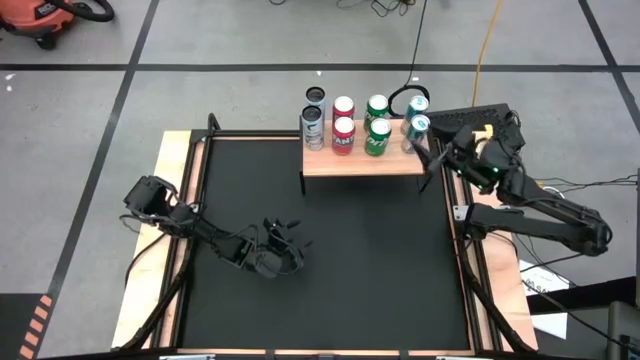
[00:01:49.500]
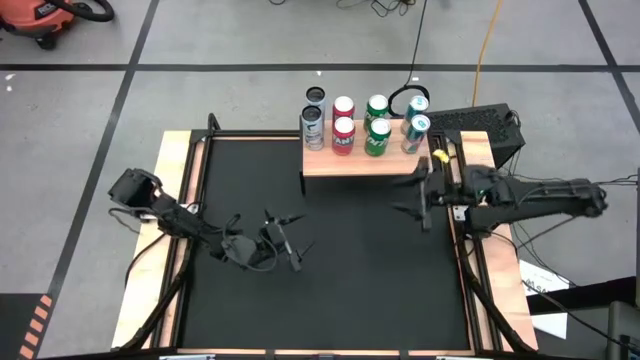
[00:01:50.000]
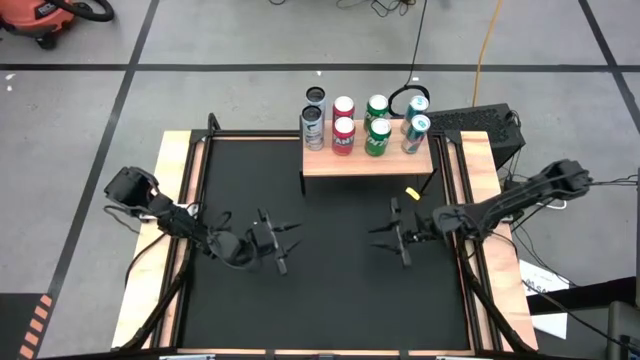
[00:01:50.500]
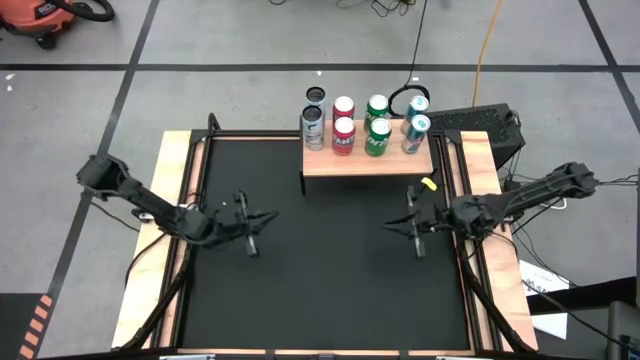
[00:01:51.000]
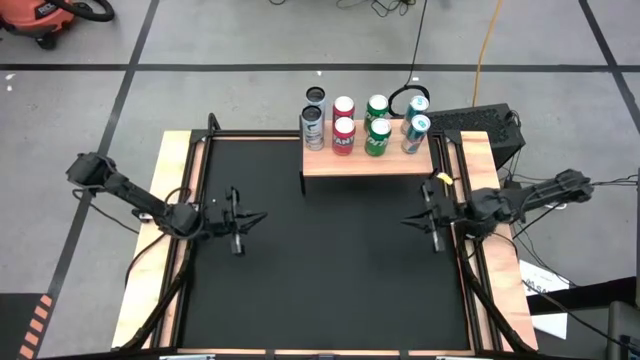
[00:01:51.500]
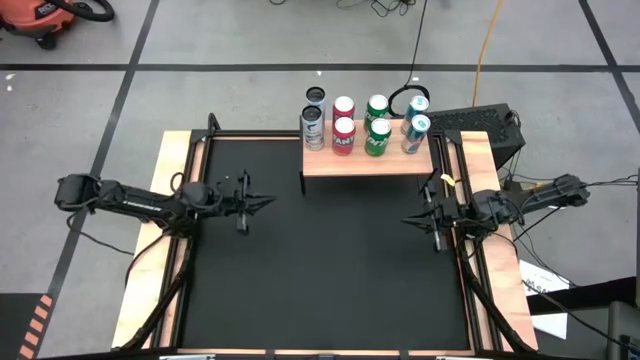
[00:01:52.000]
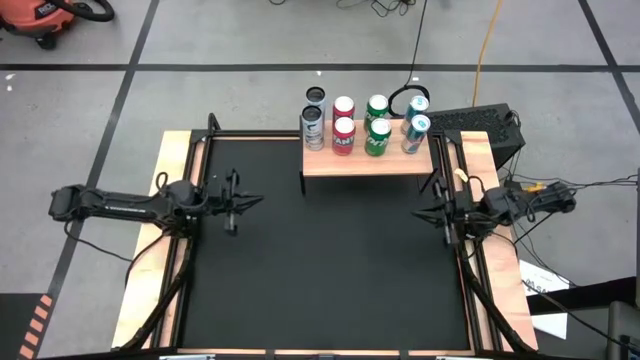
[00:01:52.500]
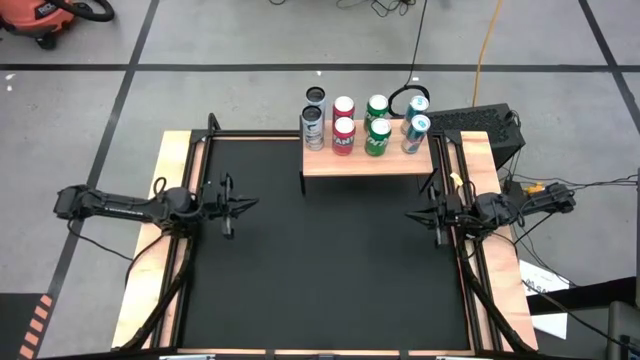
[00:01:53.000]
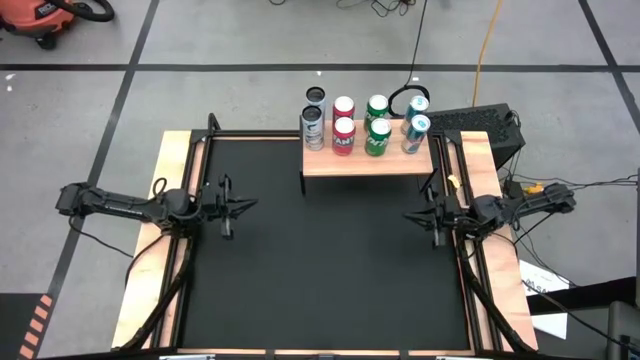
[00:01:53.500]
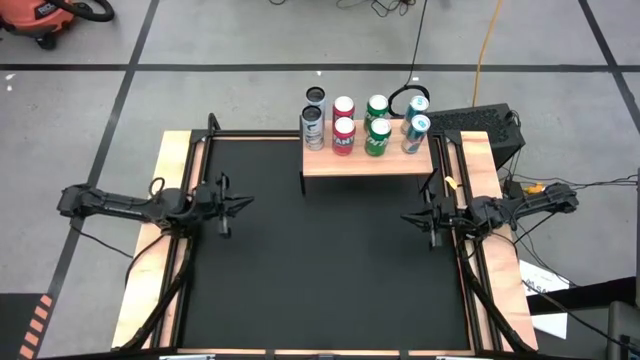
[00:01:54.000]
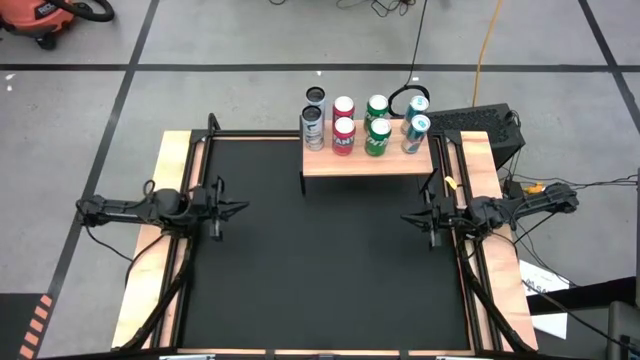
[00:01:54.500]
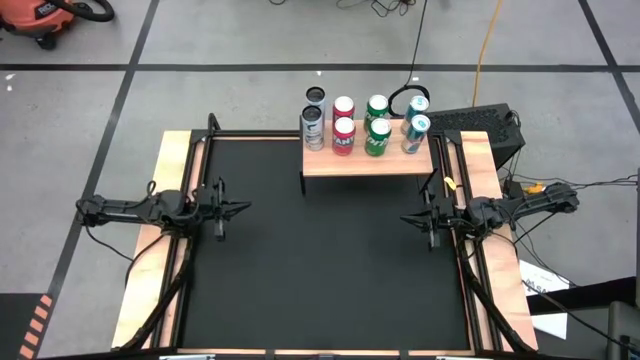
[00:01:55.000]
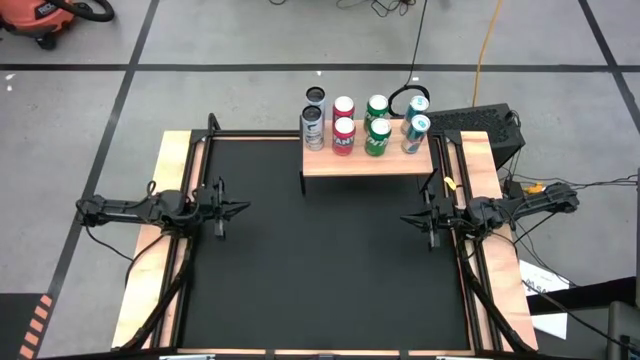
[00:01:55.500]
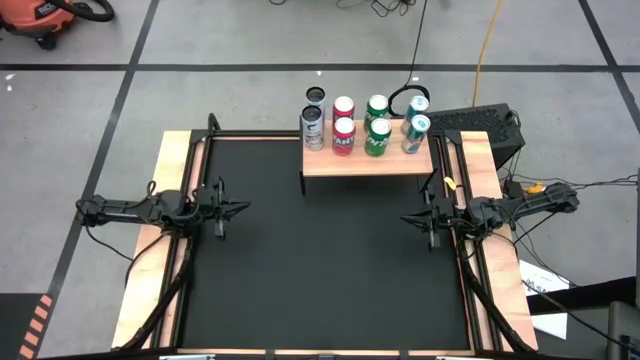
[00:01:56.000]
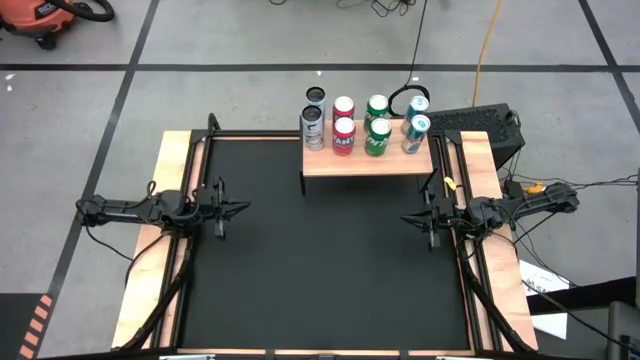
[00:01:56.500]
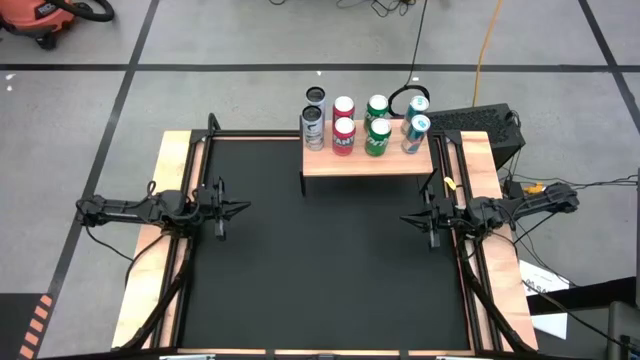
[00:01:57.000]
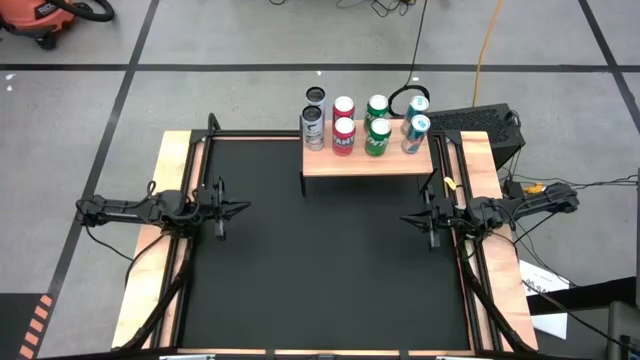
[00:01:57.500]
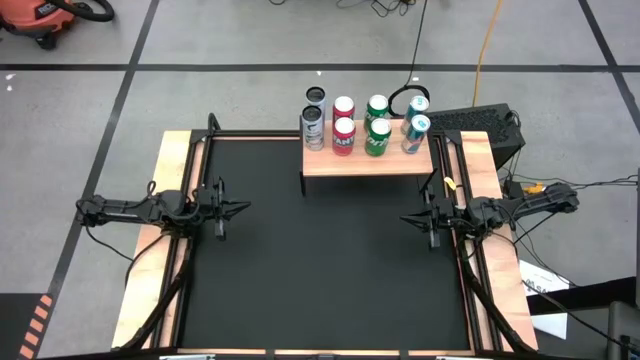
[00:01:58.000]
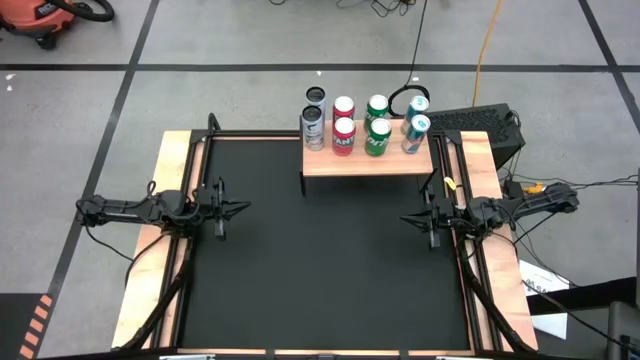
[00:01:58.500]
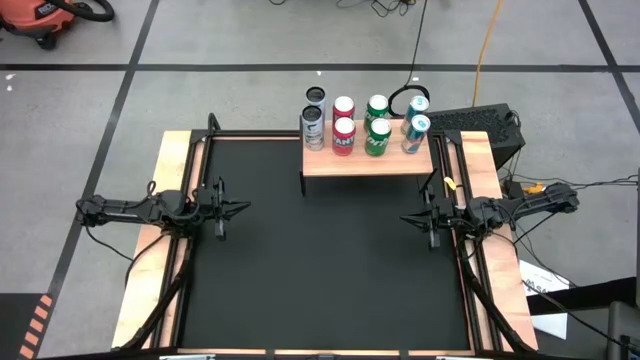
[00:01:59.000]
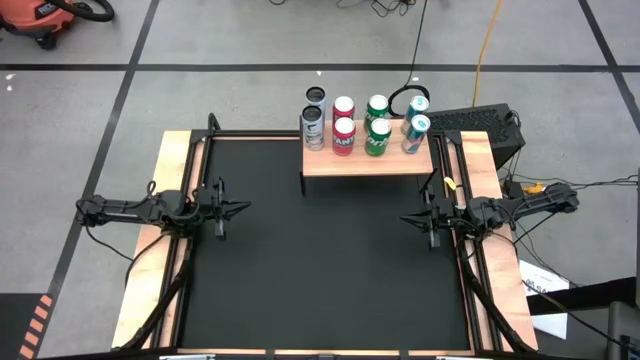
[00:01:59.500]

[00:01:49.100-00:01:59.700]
Task: Place canned beverage on shelf
Return to Home Position

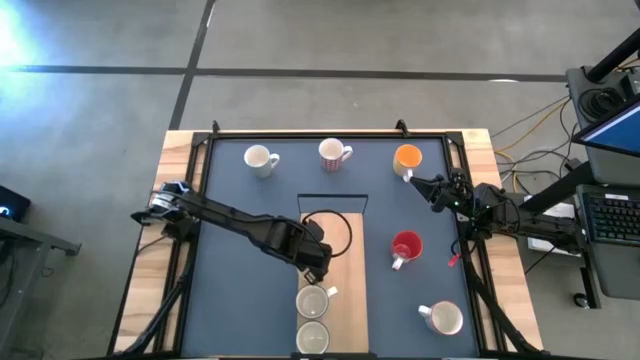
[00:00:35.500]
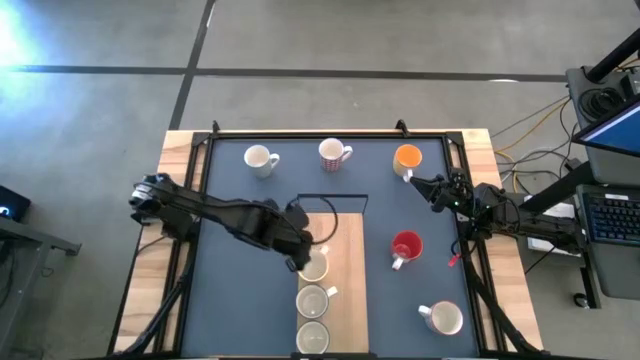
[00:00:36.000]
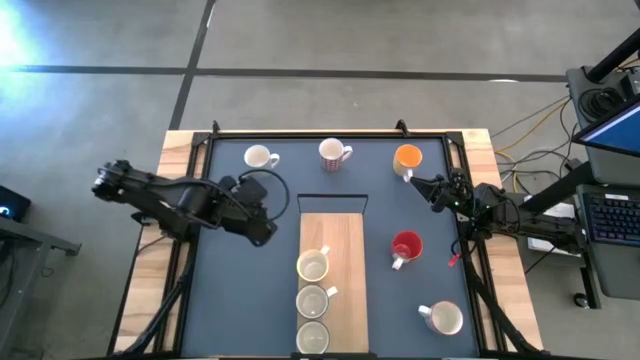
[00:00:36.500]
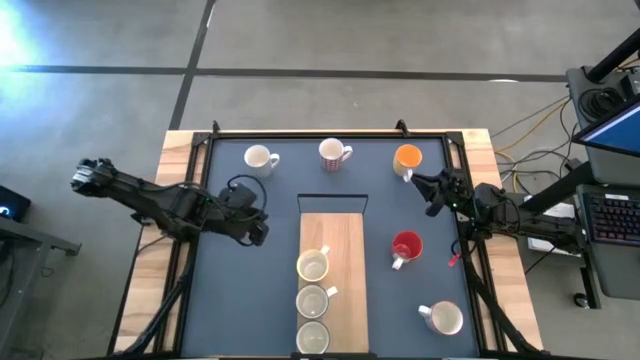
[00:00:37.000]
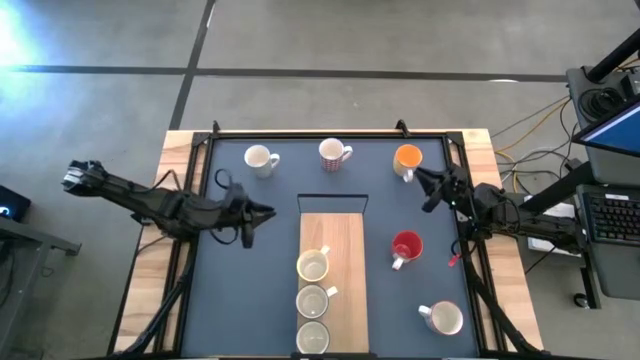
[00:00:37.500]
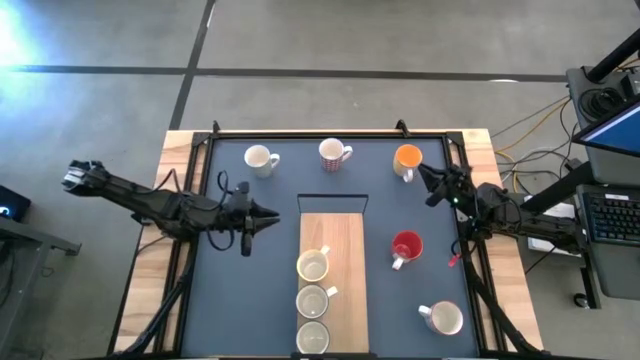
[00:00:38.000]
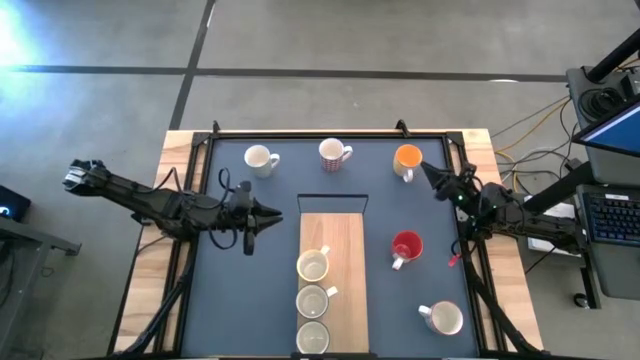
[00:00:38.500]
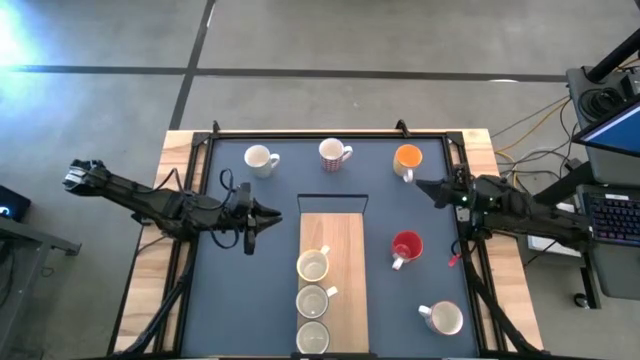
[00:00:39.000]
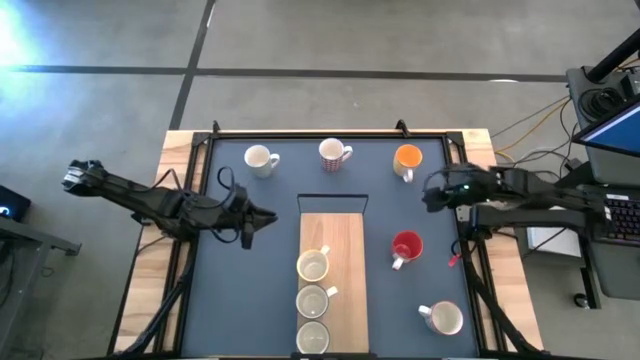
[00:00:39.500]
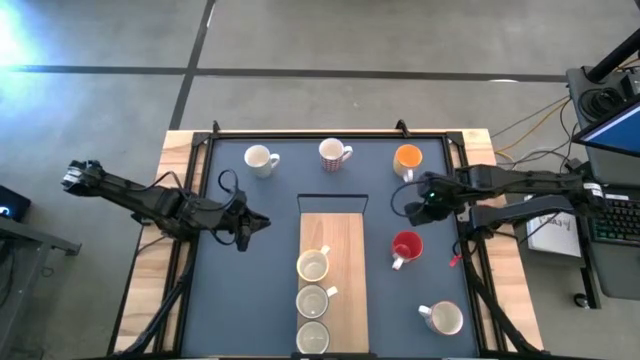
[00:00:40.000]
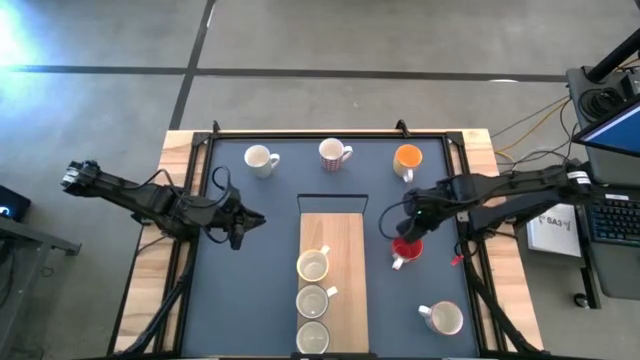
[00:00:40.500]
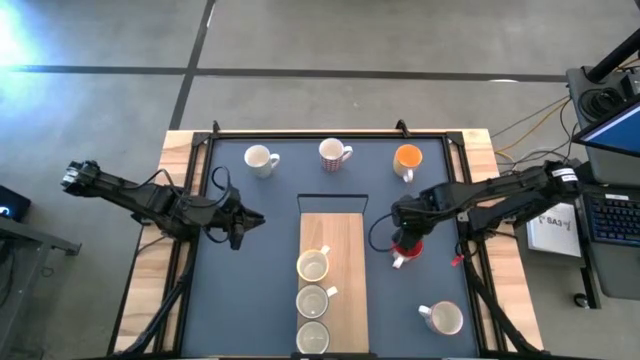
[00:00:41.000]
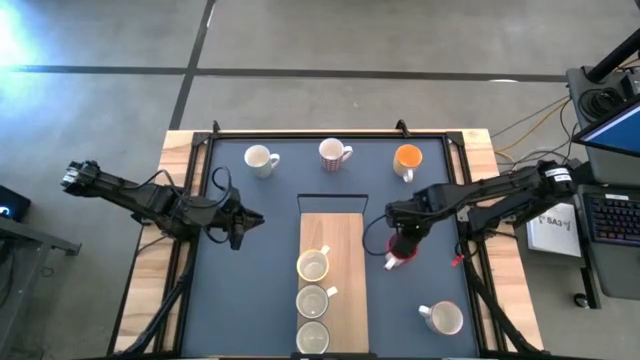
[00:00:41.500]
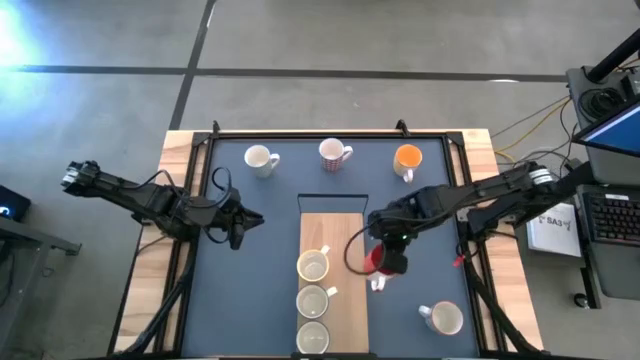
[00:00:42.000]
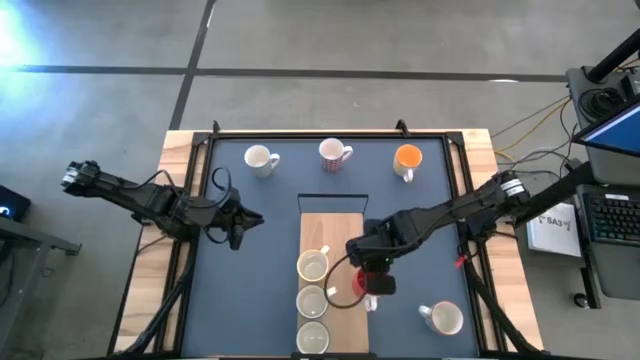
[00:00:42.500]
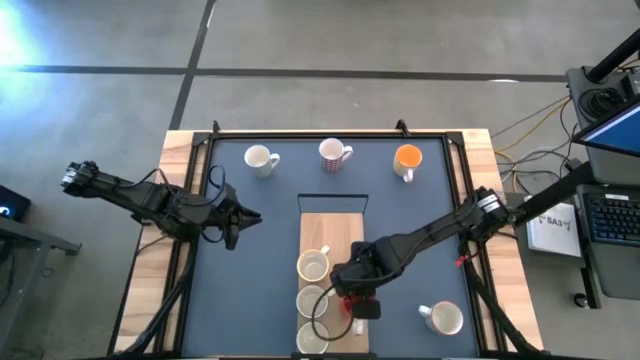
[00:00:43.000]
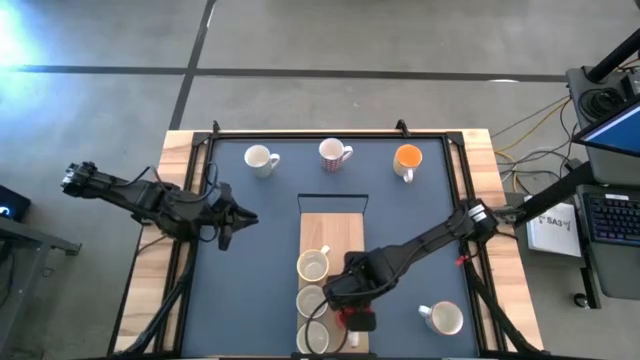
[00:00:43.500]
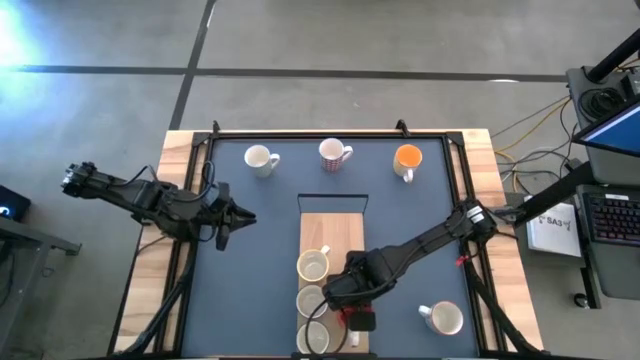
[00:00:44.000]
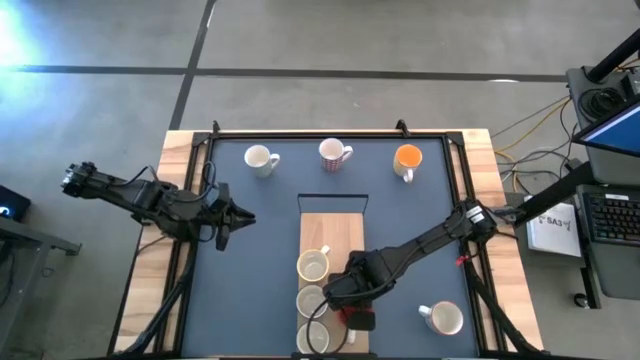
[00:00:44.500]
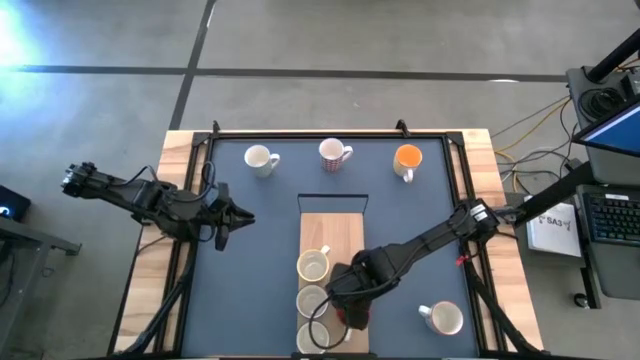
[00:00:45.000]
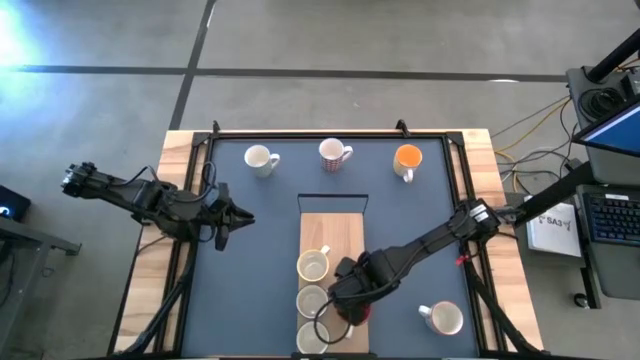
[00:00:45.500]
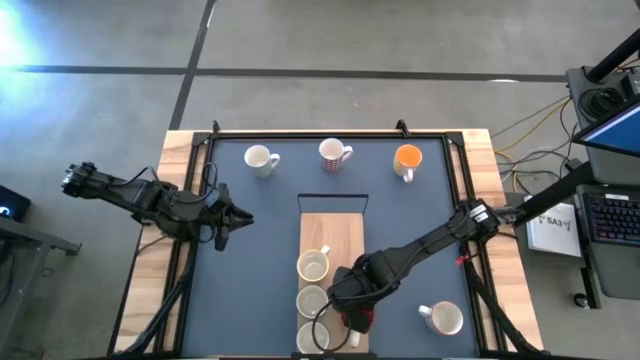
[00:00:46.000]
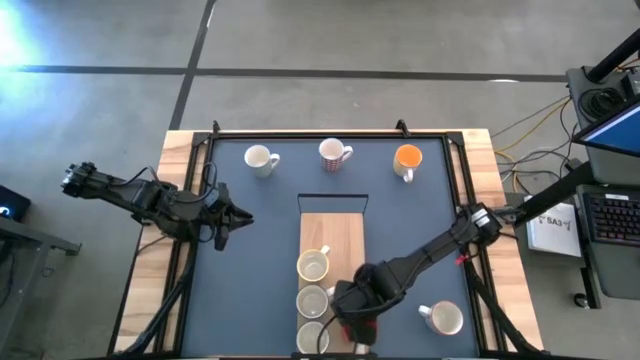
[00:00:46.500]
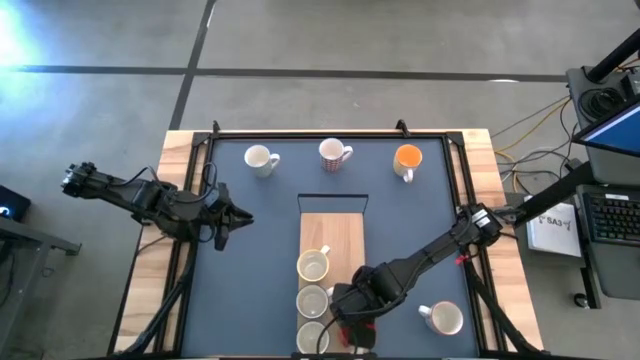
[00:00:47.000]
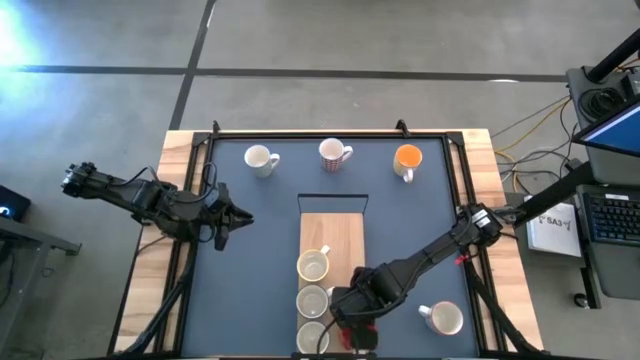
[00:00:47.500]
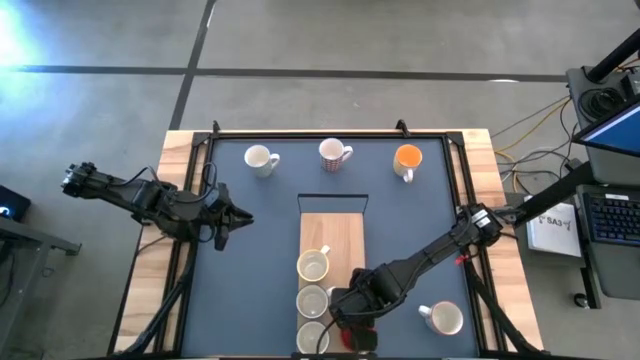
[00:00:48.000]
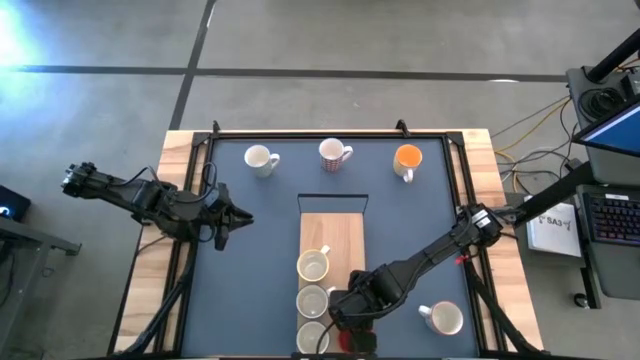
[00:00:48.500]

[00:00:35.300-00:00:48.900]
Task: Place coffee mugs
Put the red mug on the shelf
